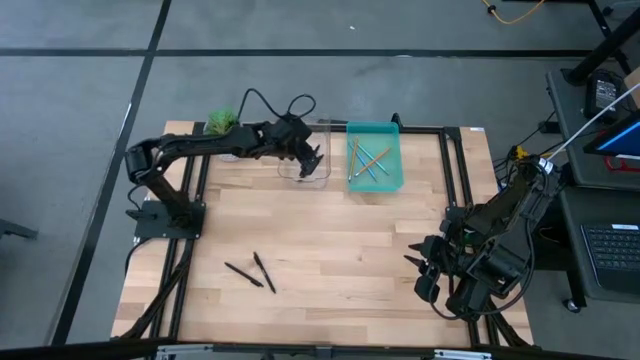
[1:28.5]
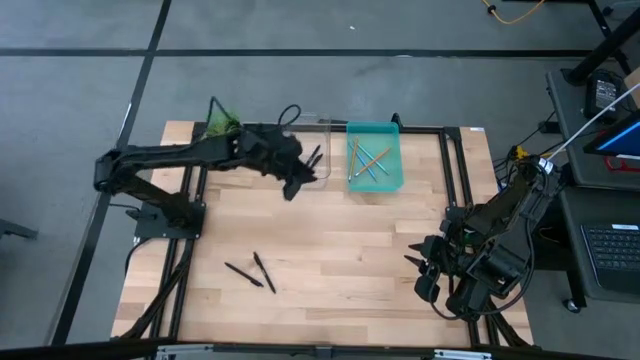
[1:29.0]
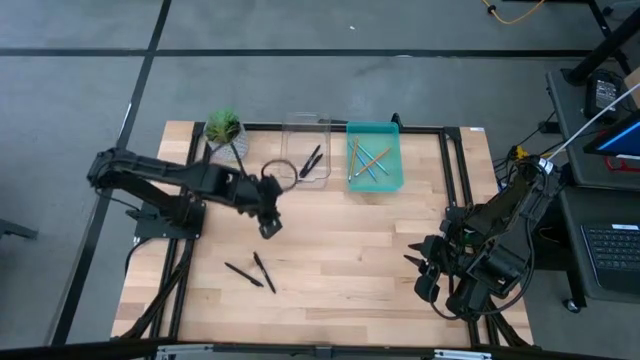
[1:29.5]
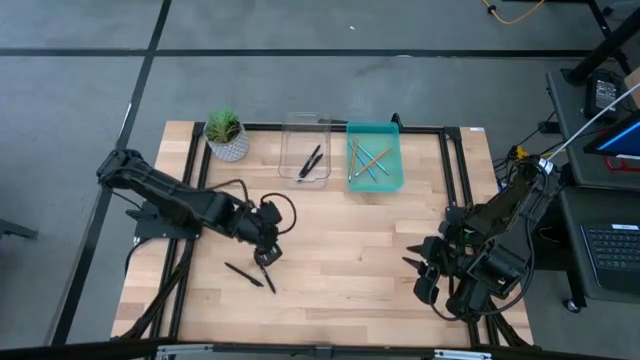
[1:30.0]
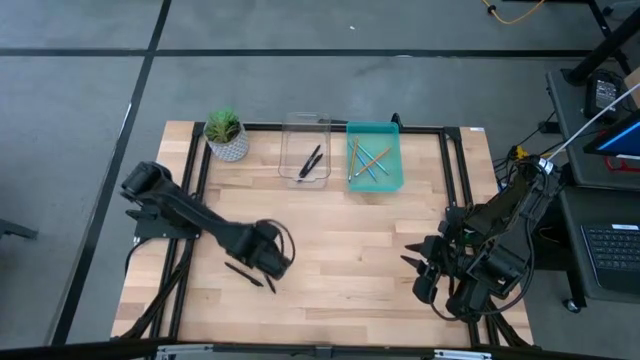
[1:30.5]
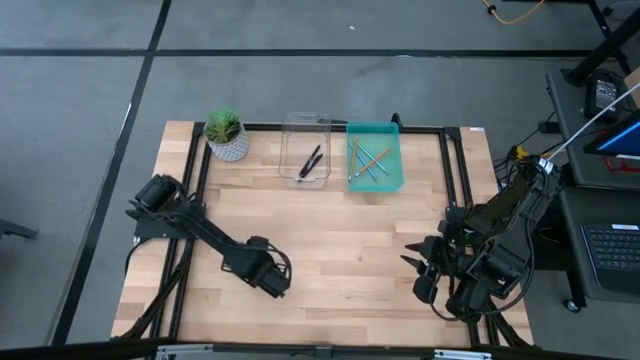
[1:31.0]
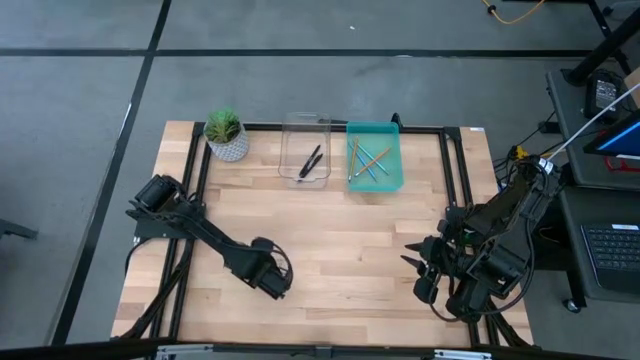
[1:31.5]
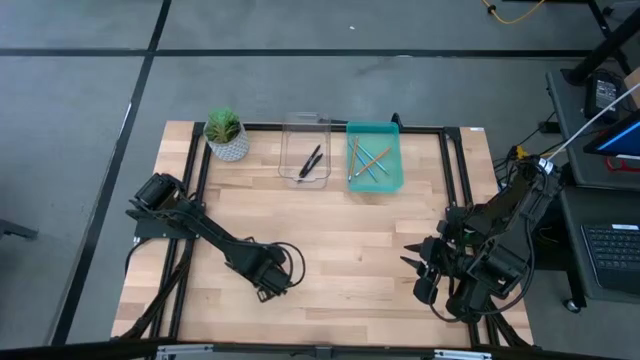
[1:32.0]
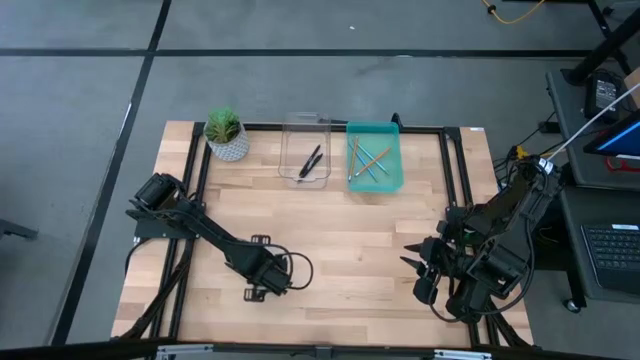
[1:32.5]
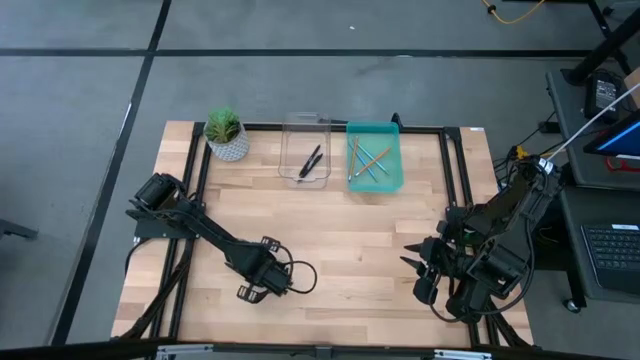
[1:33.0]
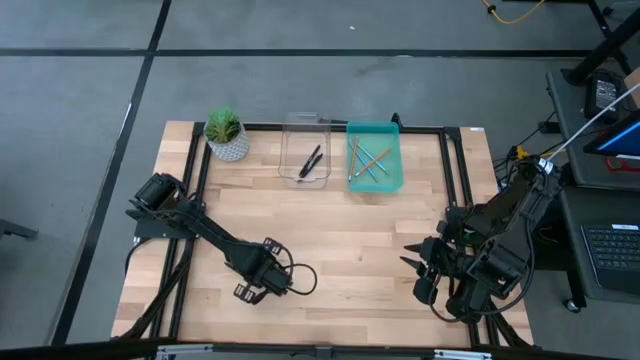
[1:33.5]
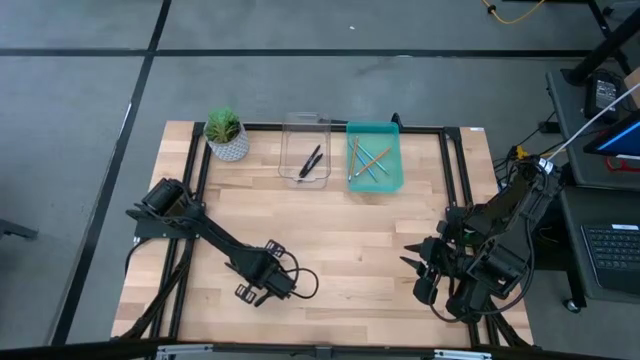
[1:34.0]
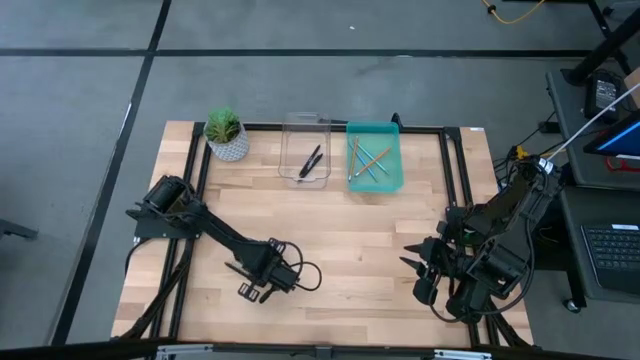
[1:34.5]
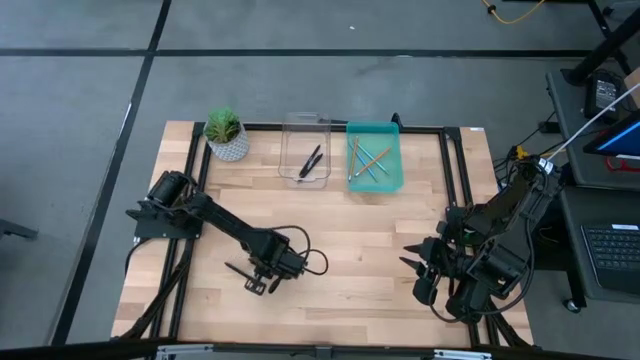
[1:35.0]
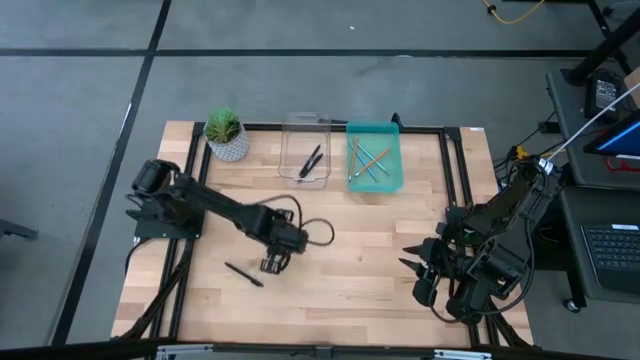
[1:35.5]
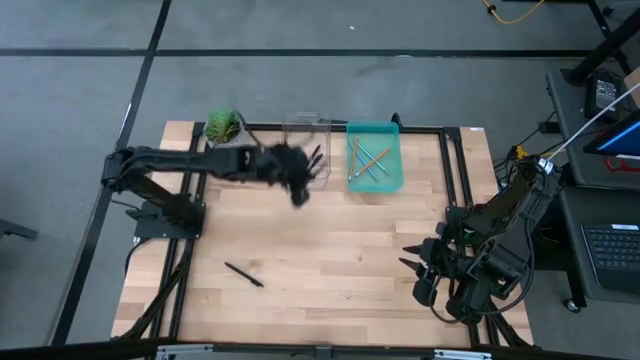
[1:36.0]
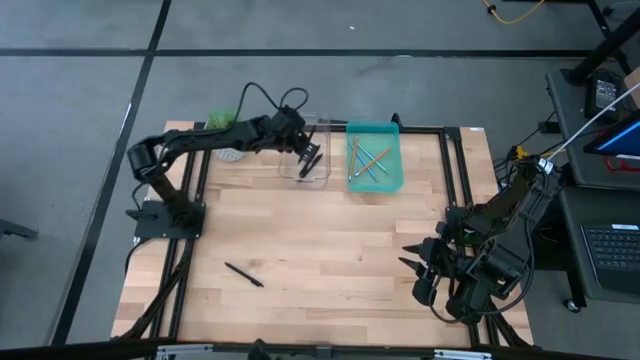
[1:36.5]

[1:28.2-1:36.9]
Task: Sort pens & pencils
Put the right black pen into the transparent bin

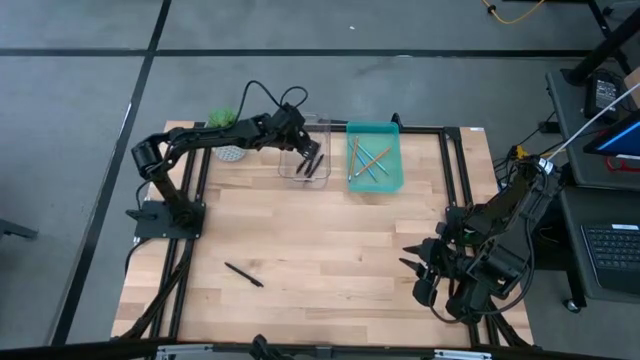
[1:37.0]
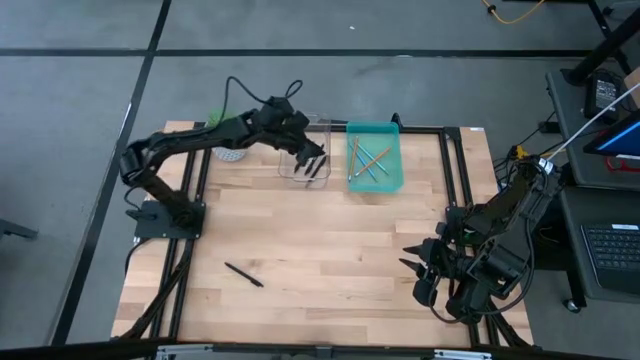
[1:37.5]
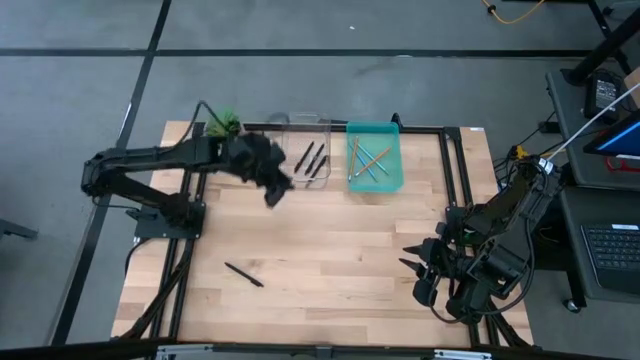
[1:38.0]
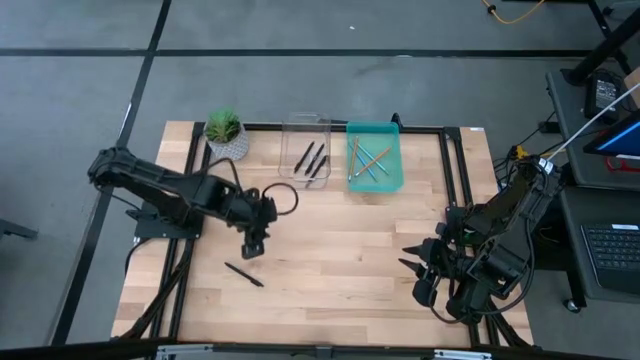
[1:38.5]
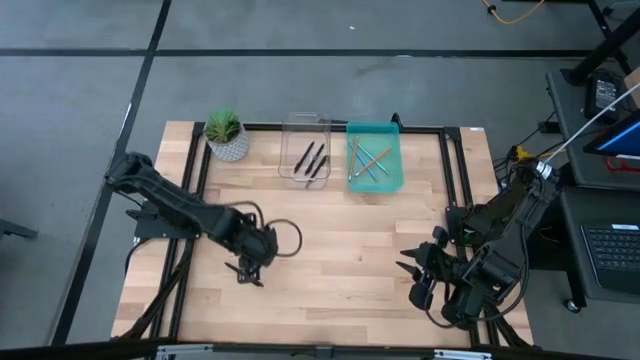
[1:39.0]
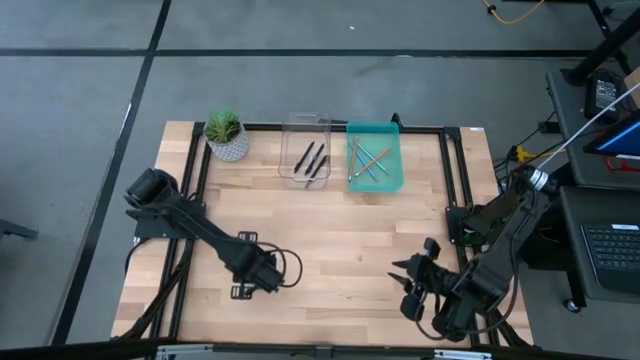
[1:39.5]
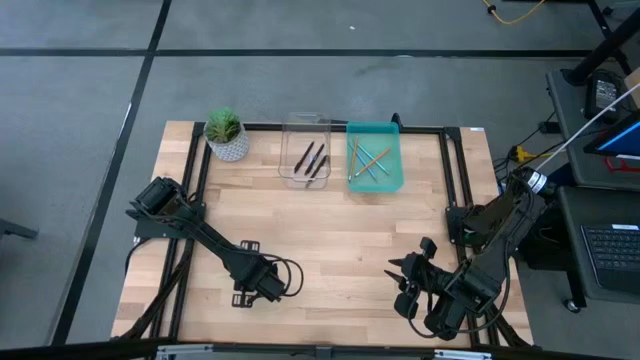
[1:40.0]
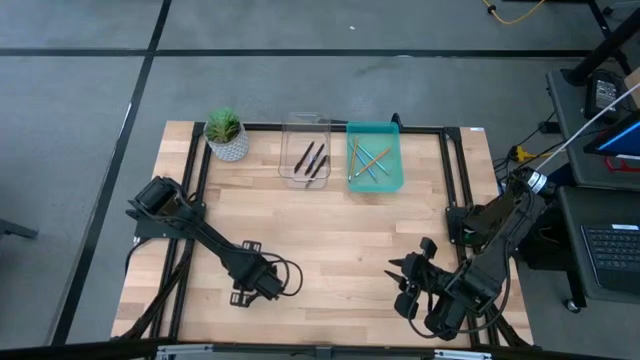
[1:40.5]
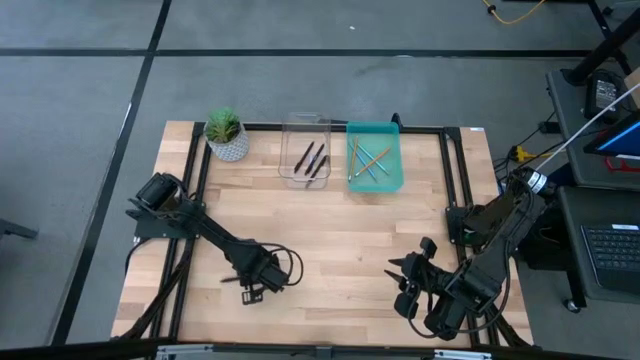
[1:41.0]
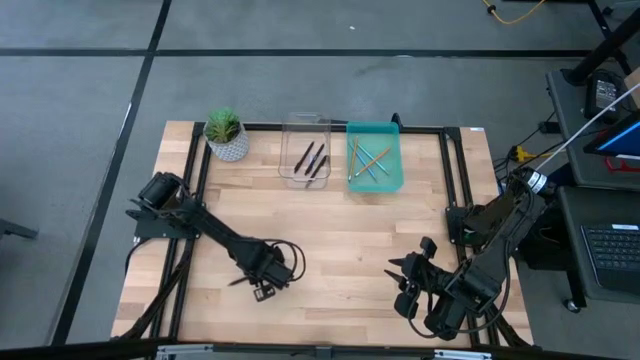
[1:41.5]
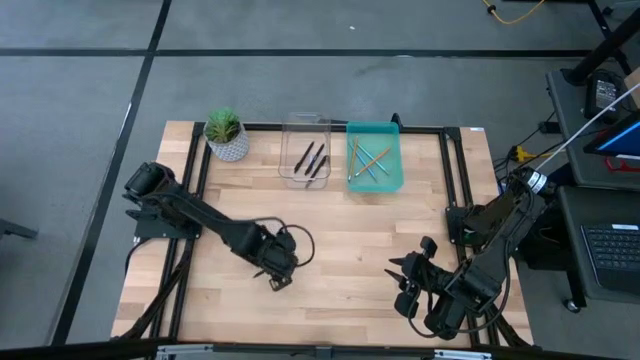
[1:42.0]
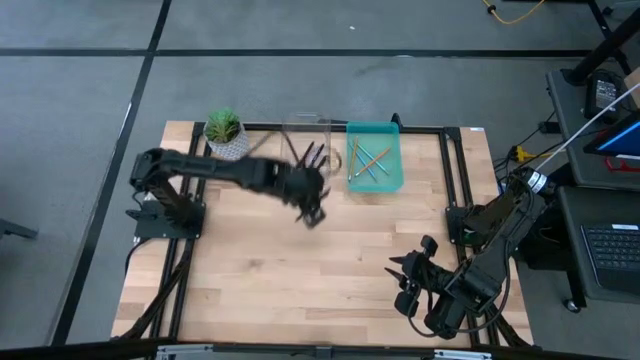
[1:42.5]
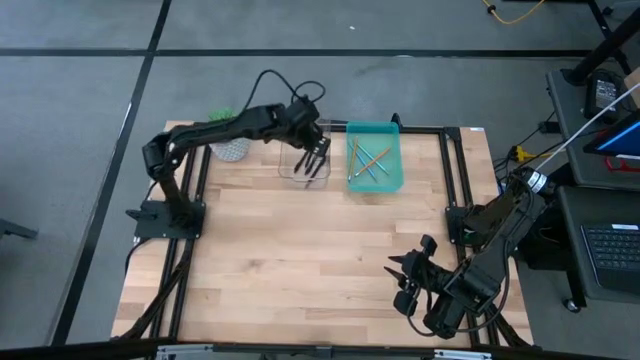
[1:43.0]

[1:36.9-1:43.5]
Put the black pen into the transparent bin

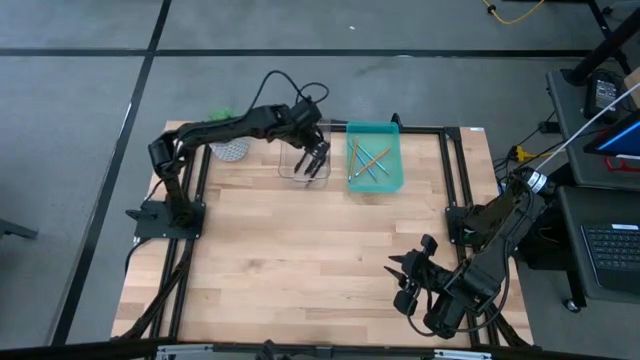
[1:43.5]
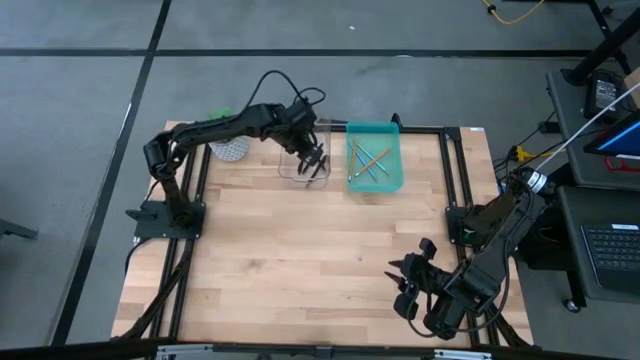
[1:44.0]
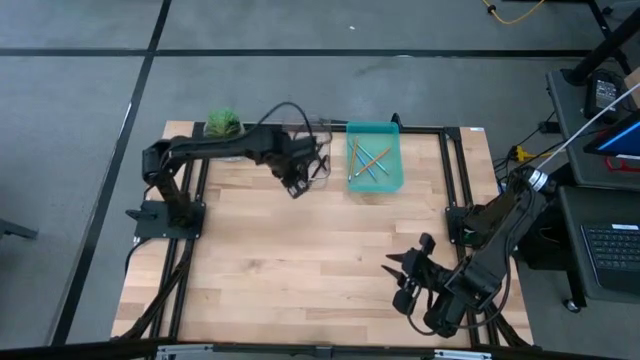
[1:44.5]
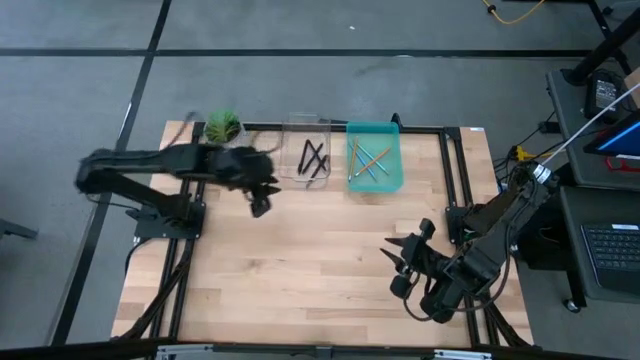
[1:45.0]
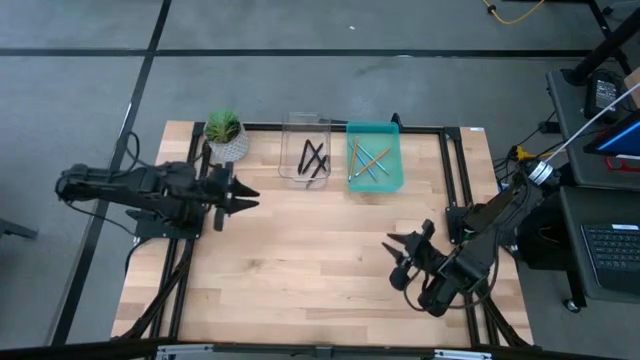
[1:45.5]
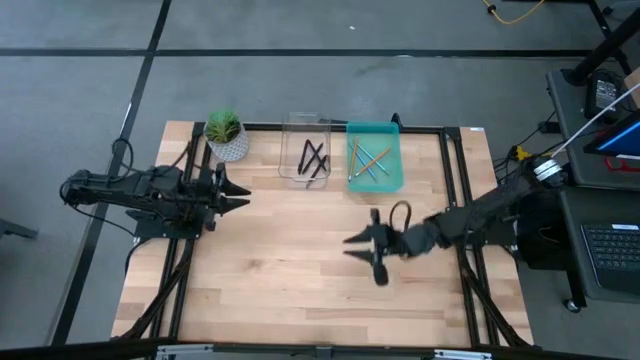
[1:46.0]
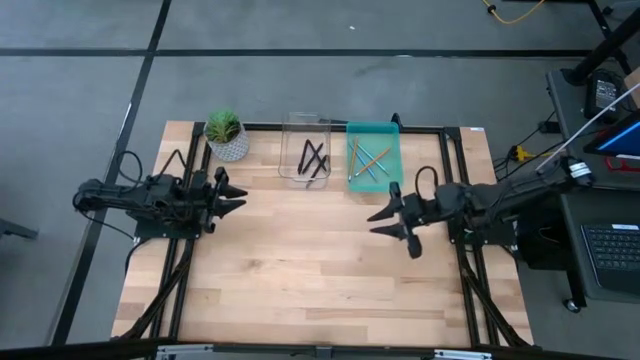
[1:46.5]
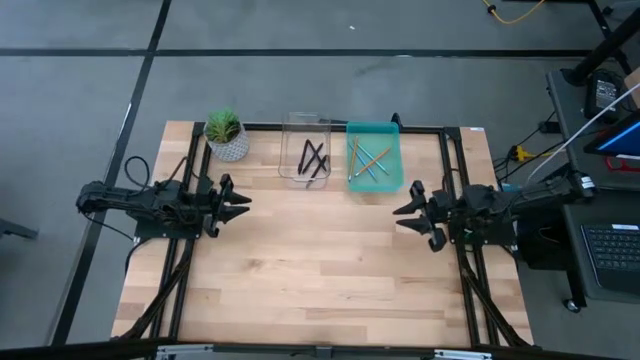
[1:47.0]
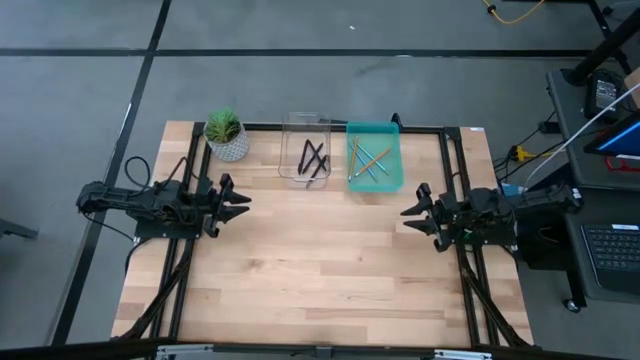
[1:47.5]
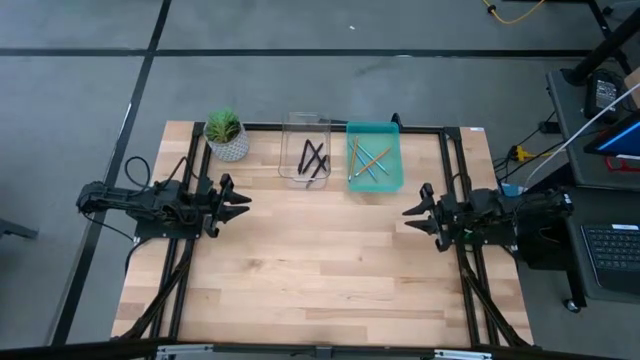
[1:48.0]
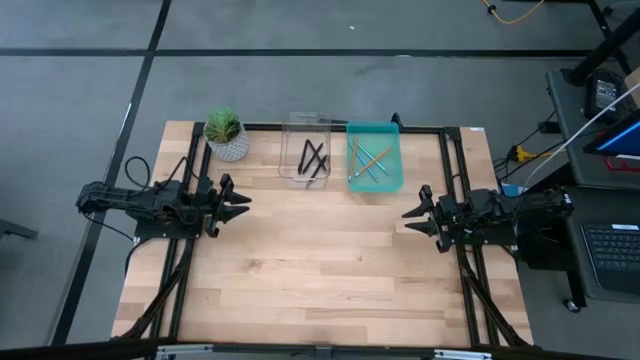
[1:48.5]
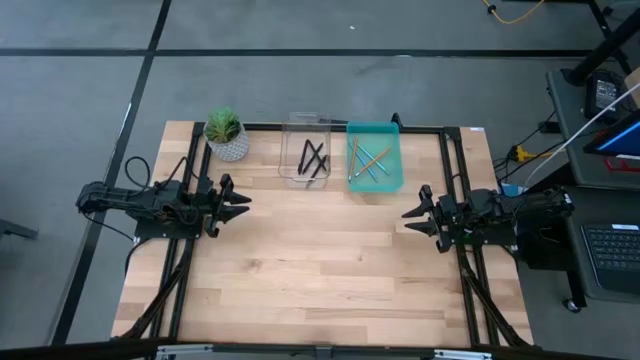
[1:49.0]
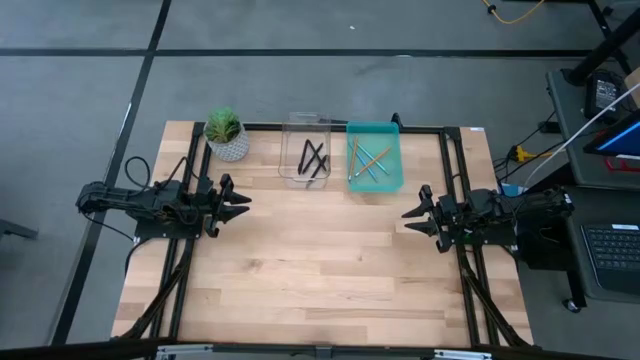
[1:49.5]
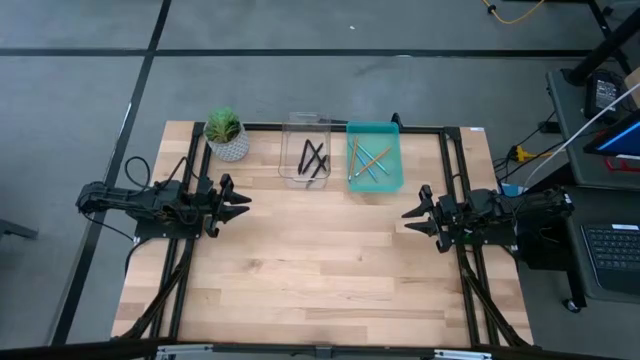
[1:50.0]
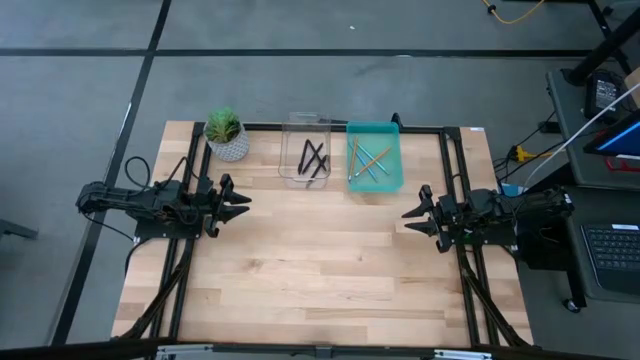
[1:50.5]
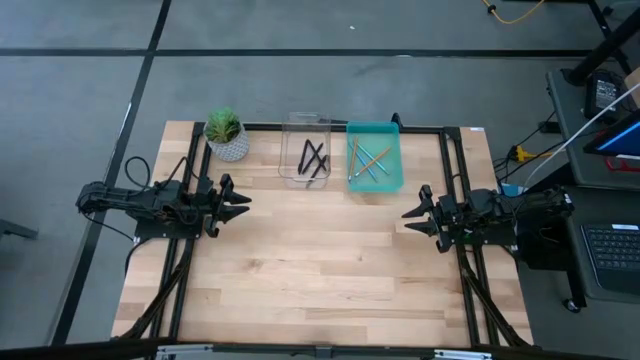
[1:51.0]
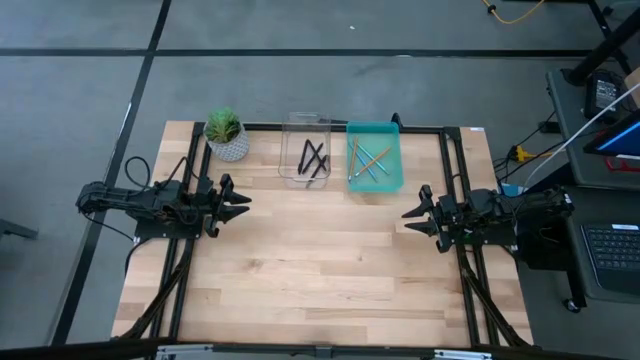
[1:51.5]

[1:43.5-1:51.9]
Return to Home Position
